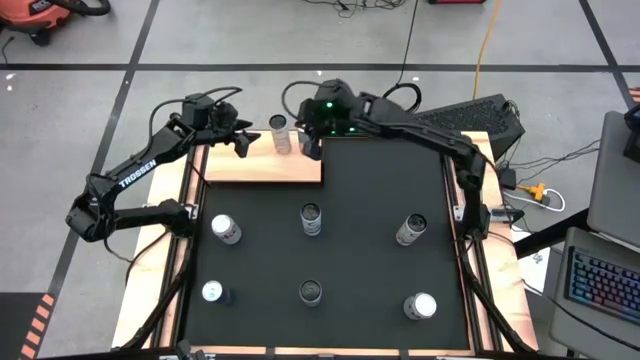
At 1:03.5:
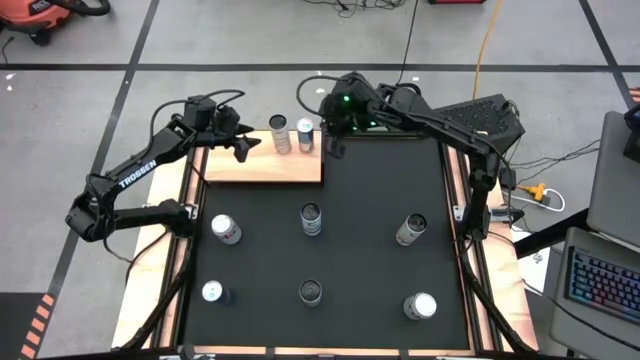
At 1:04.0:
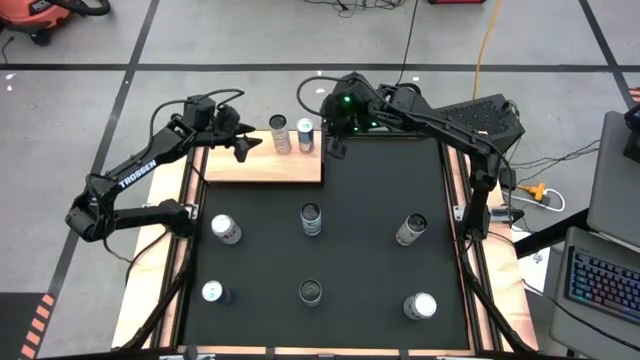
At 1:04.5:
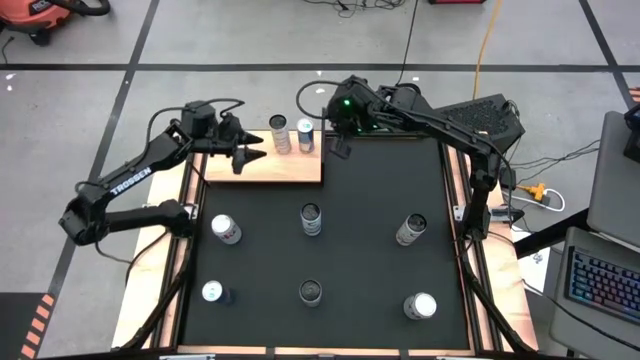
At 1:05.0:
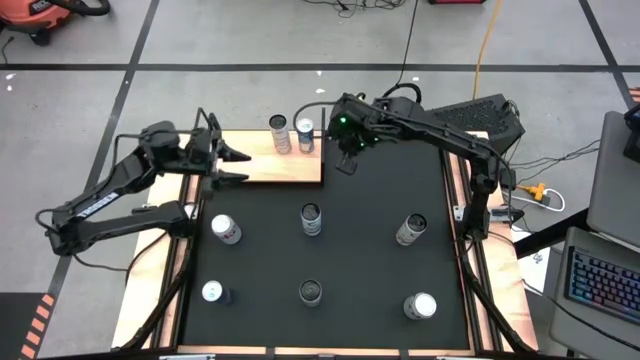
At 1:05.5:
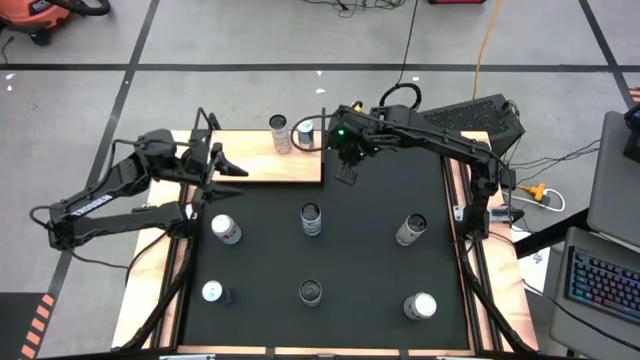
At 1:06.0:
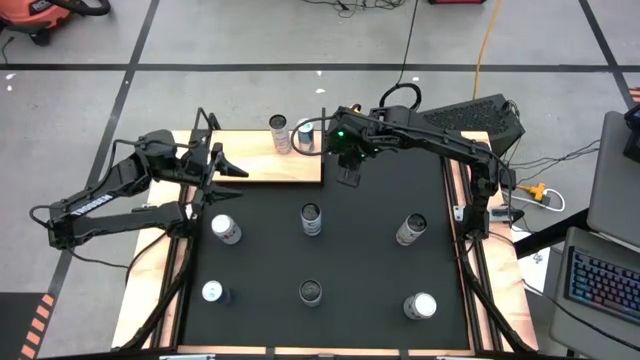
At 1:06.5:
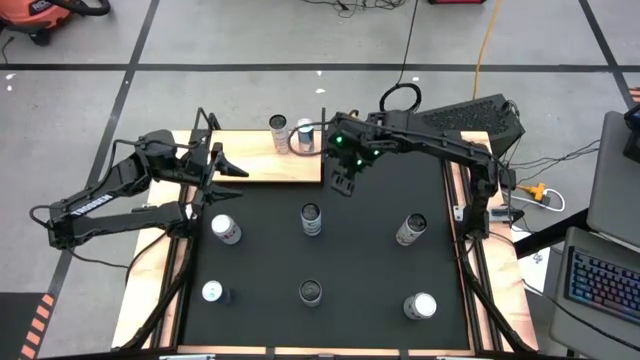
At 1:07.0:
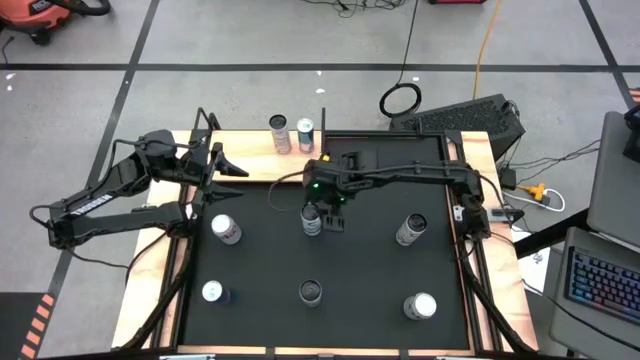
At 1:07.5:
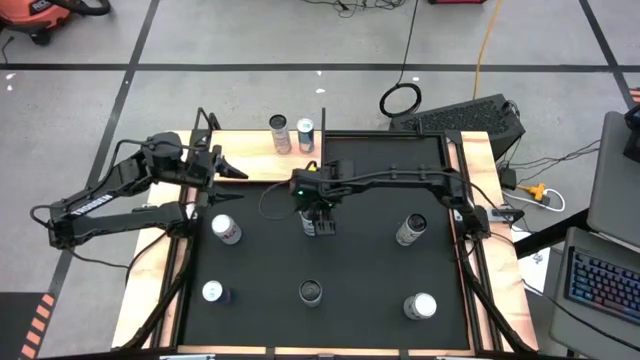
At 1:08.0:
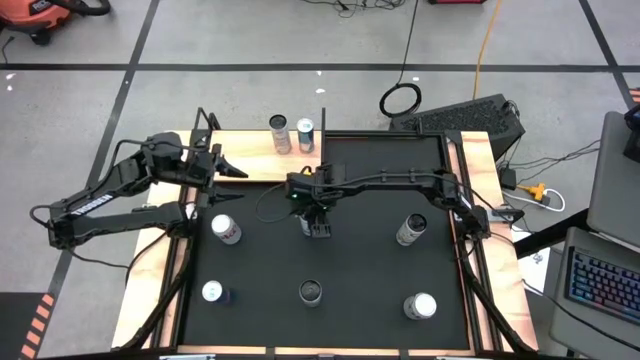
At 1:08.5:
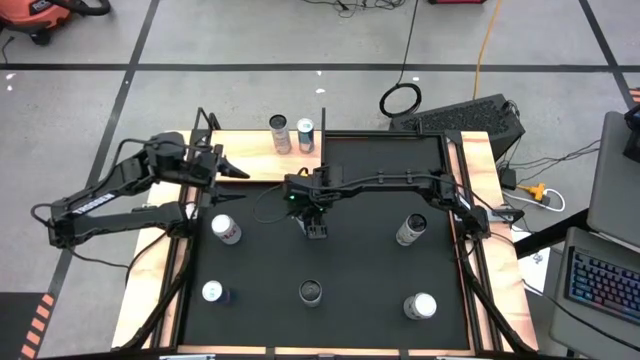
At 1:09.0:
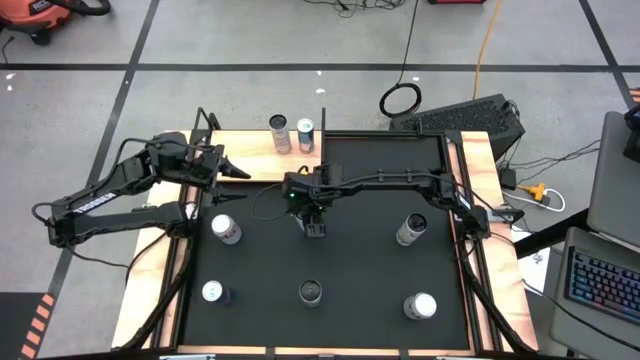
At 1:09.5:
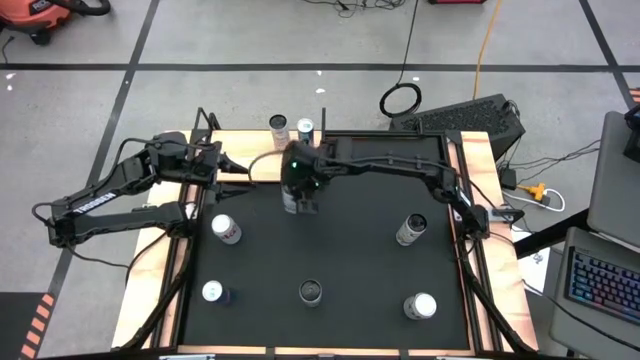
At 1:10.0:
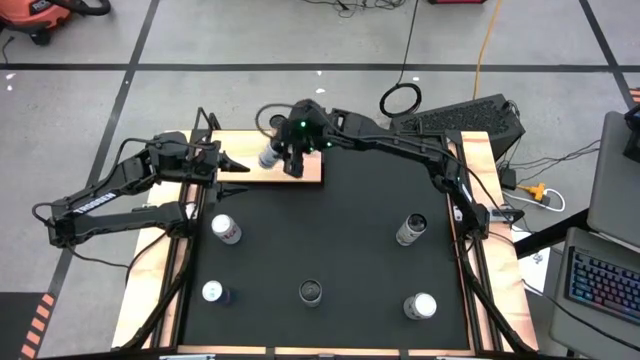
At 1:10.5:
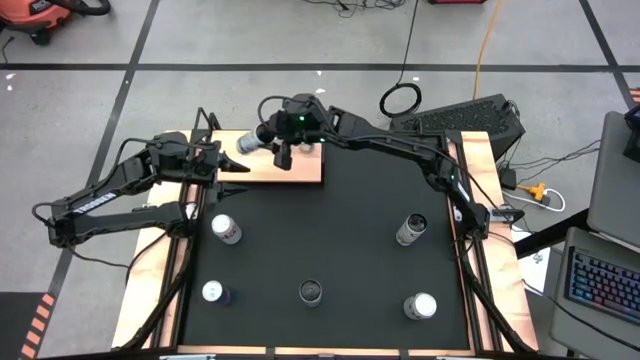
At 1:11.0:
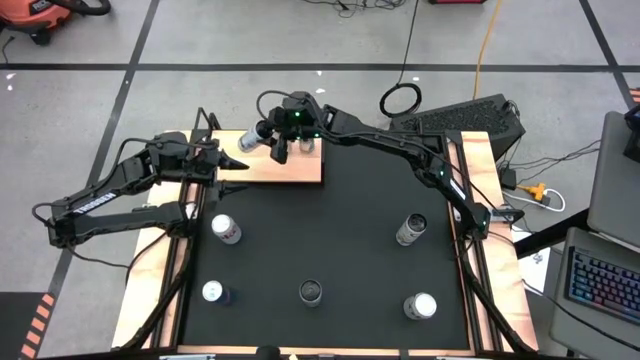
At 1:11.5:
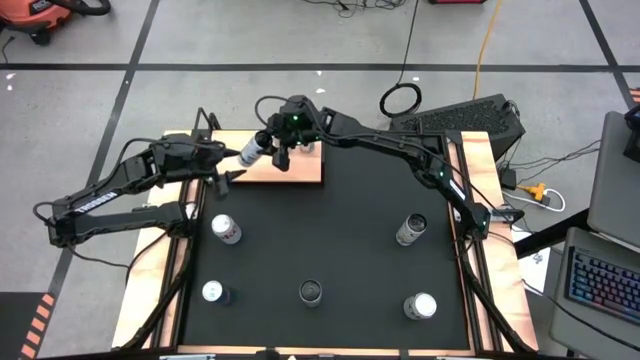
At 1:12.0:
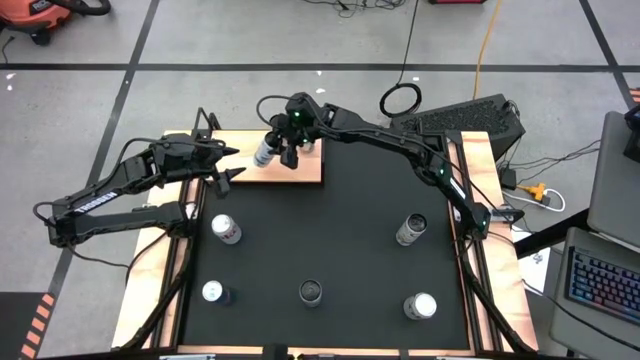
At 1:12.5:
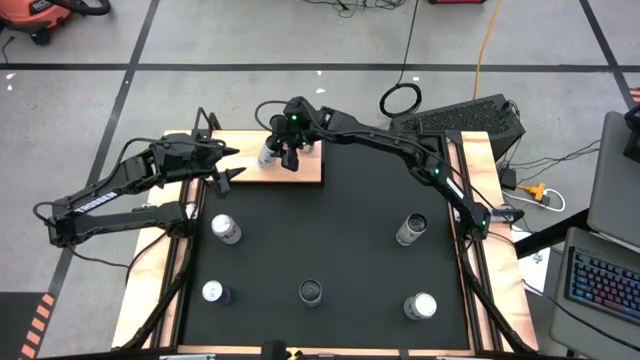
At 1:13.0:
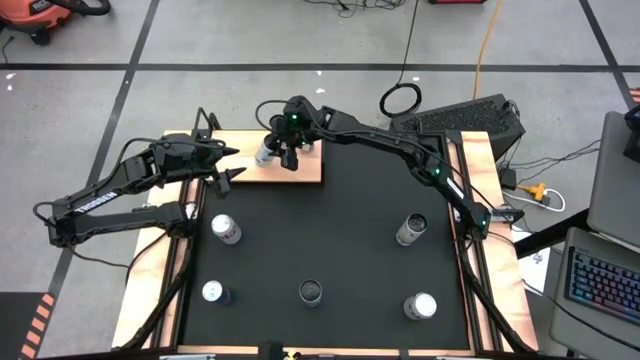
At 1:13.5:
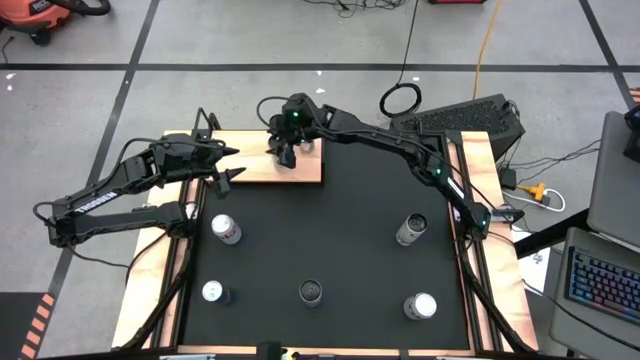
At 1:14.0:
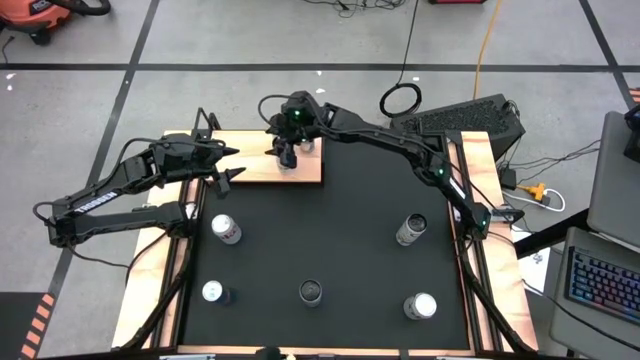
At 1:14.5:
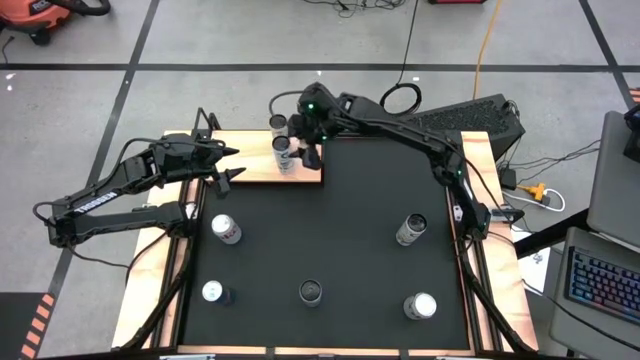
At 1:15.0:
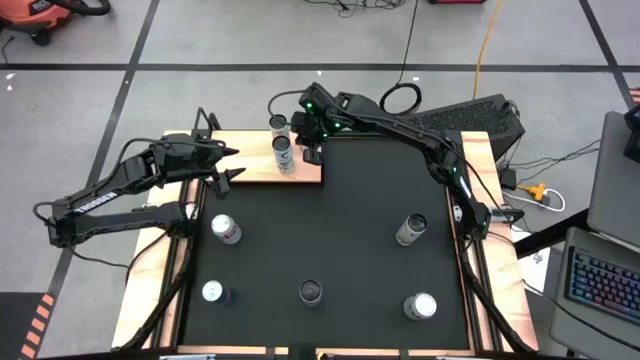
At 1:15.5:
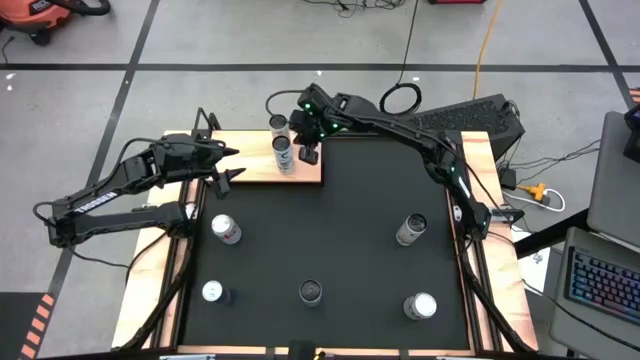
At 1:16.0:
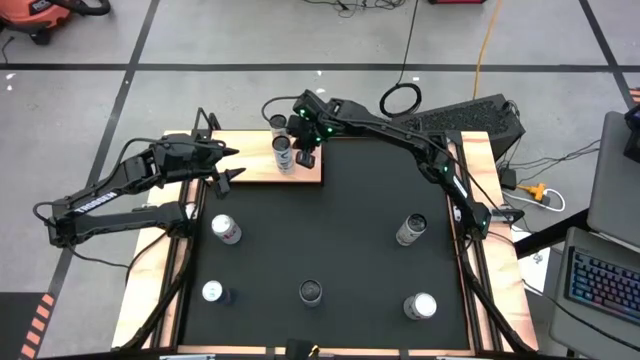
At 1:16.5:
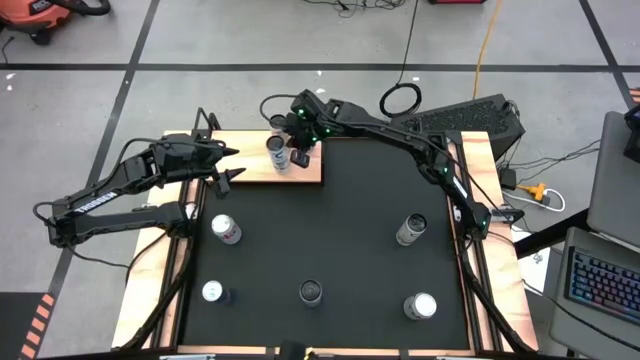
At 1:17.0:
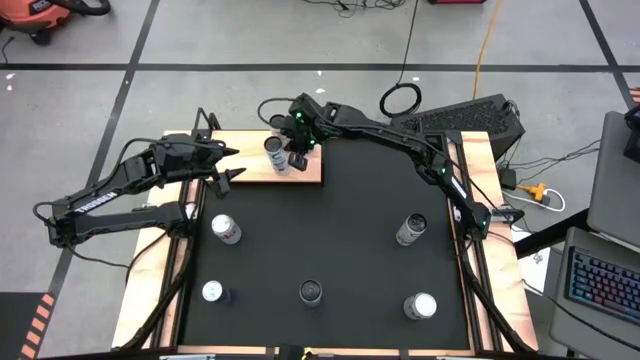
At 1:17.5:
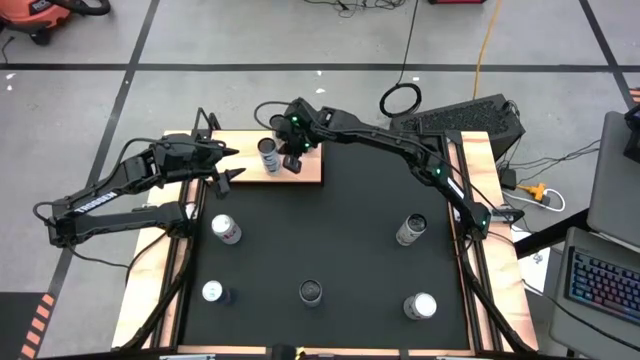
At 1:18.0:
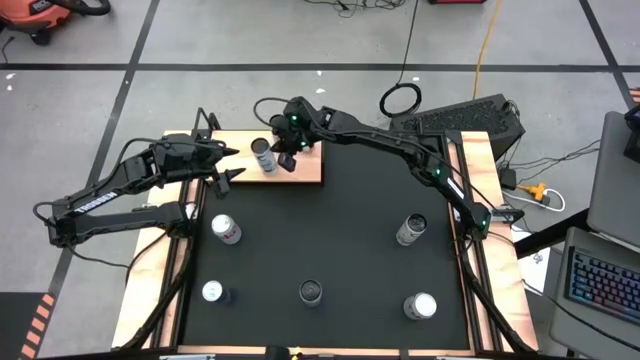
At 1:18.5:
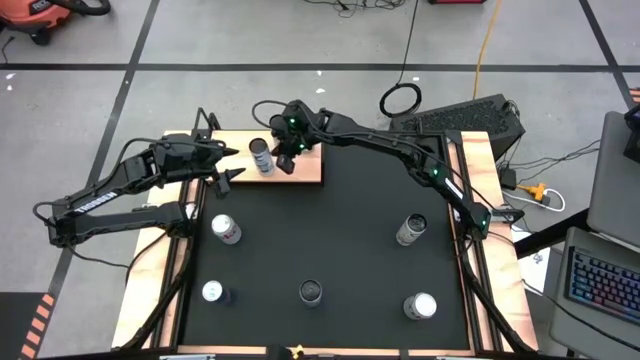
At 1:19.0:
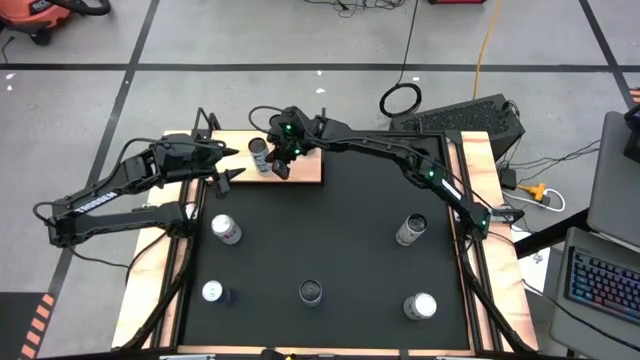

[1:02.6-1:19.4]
Task: Place canned beverage on shelf
Put the top white blue soda can on the shelf

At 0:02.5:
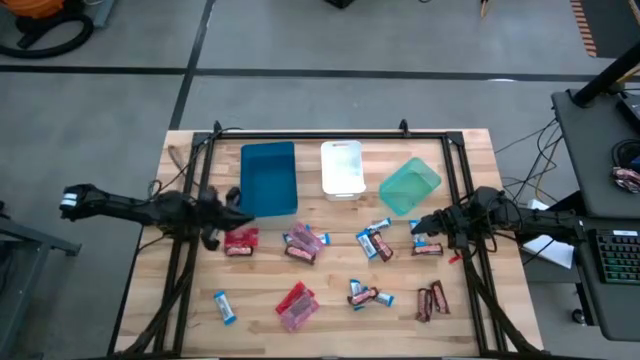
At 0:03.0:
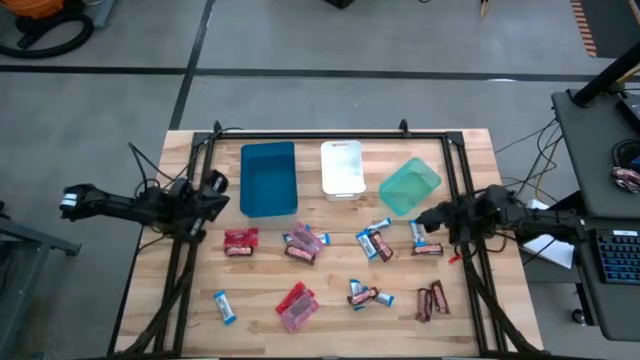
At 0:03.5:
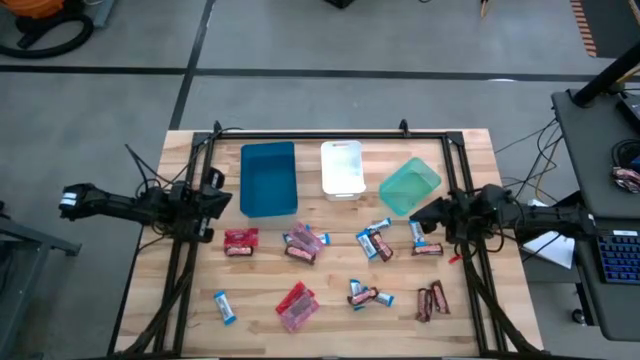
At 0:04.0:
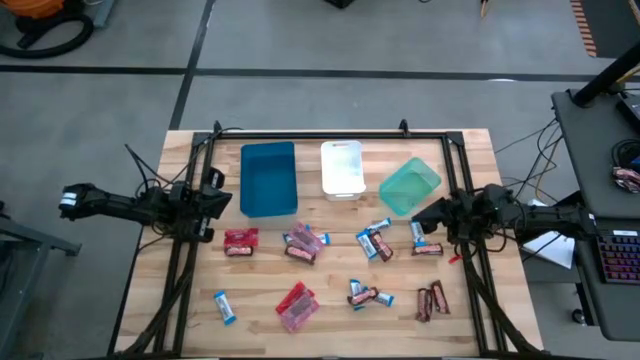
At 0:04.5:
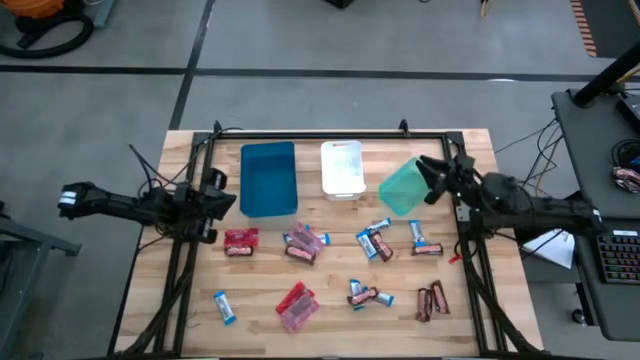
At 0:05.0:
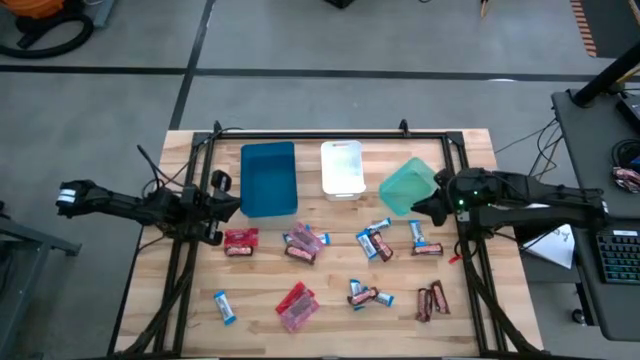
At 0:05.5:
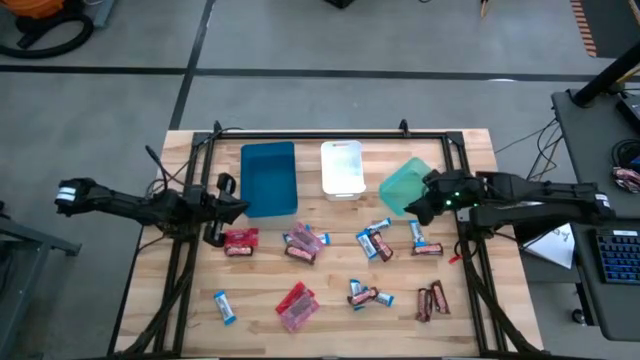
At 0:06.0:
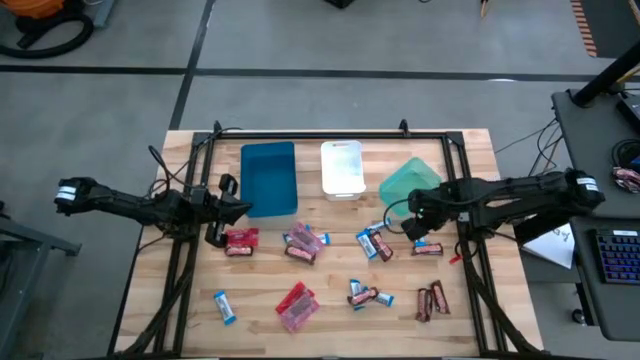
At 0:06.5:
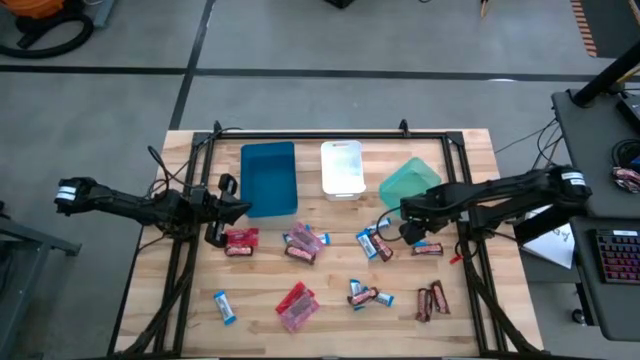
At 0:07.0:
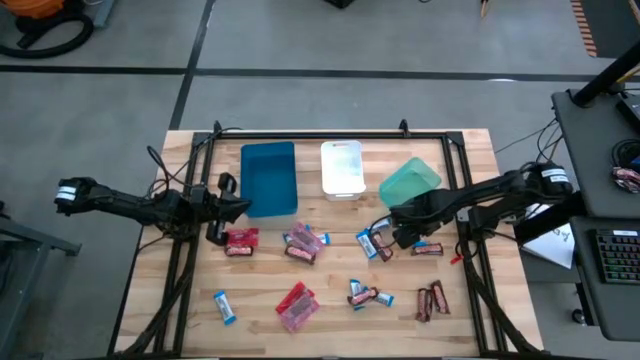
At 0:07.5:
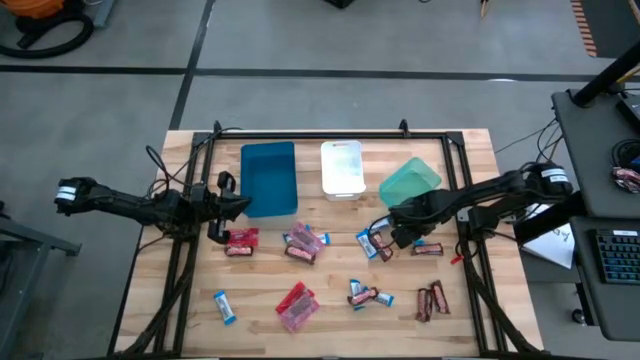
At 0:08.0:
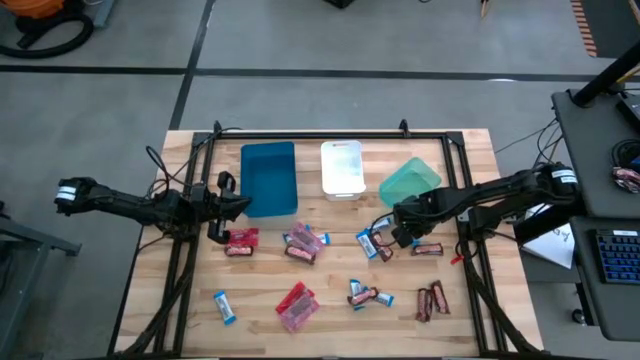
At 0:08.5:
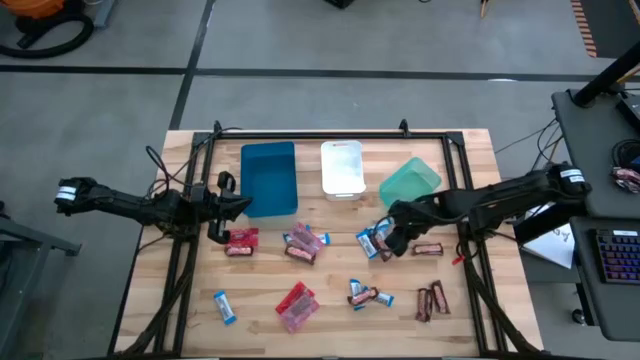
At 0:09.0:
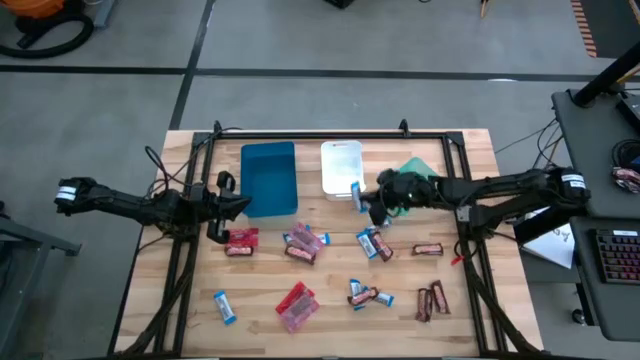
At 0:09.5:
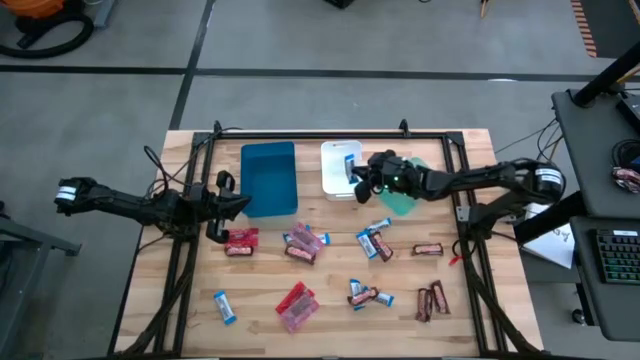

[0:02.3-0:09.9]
Task: Sort candy
Put the white chocolate into the white bin
